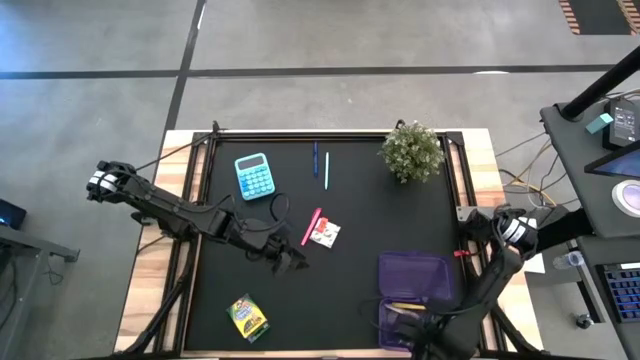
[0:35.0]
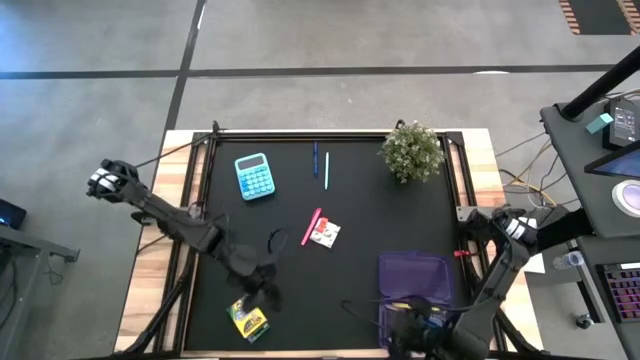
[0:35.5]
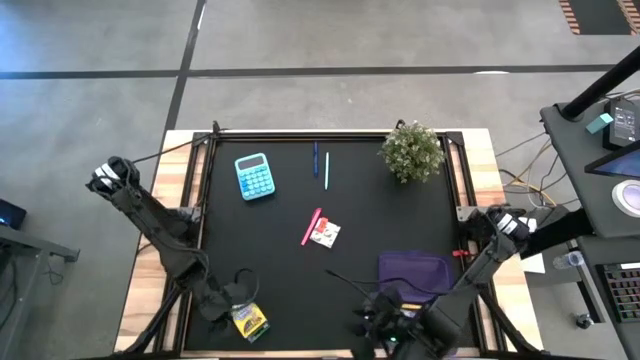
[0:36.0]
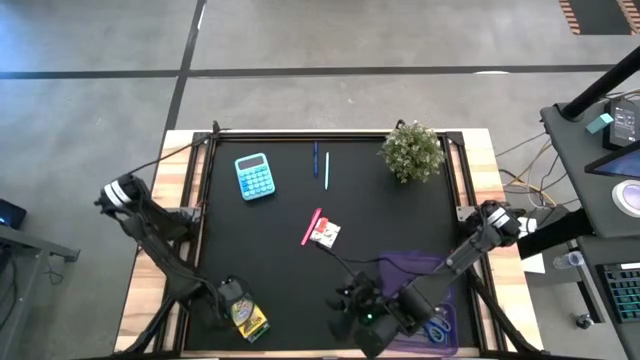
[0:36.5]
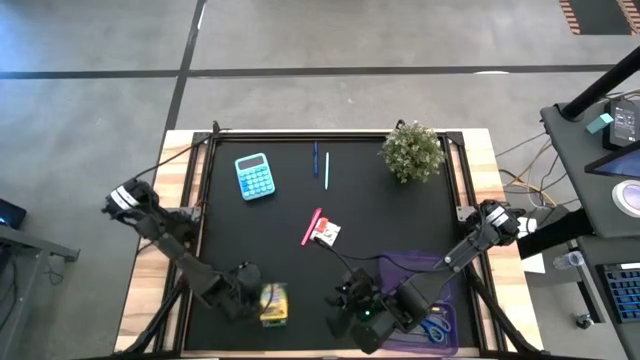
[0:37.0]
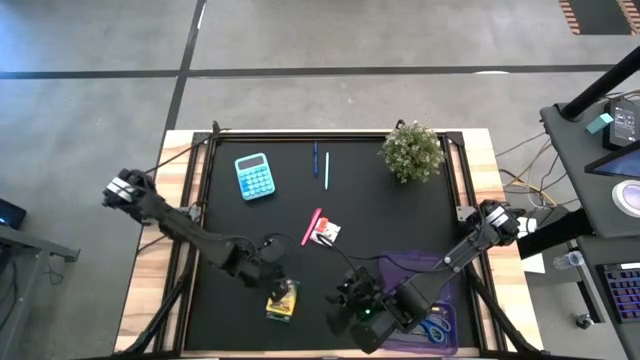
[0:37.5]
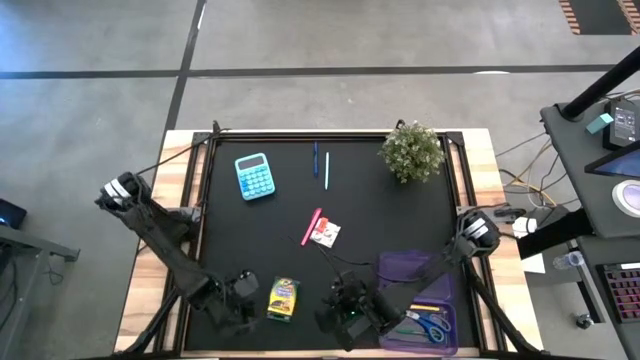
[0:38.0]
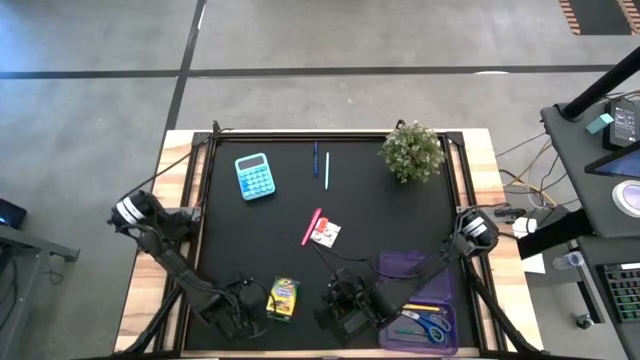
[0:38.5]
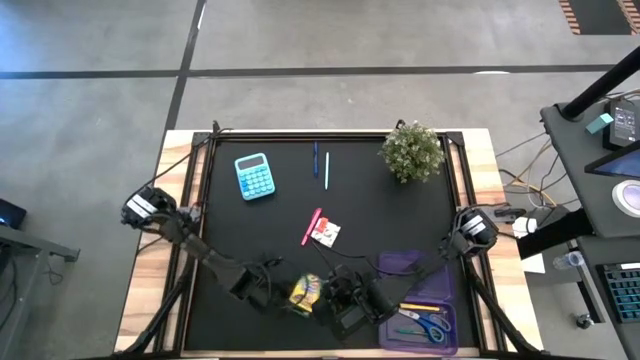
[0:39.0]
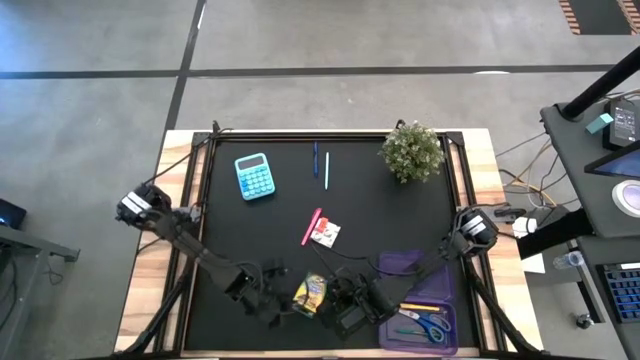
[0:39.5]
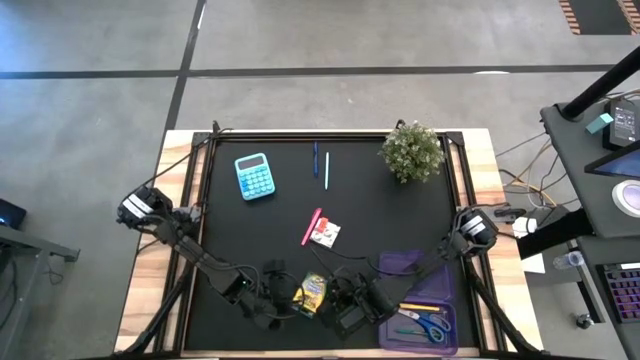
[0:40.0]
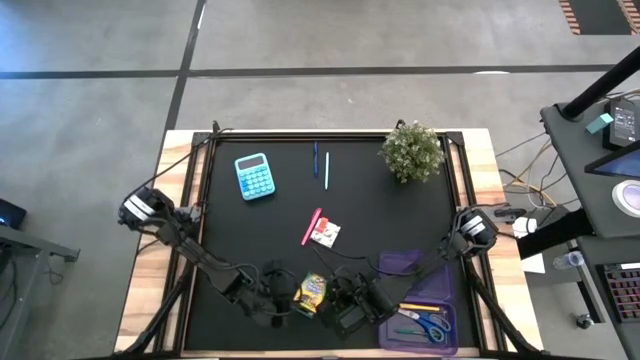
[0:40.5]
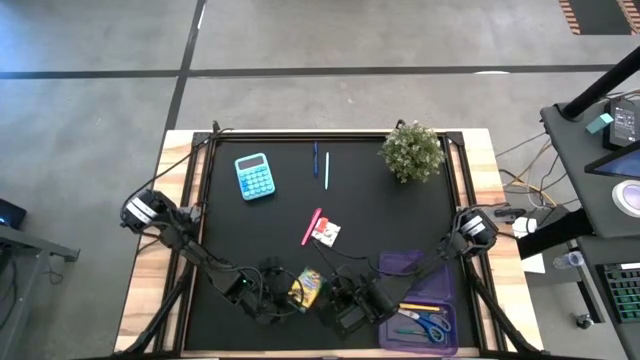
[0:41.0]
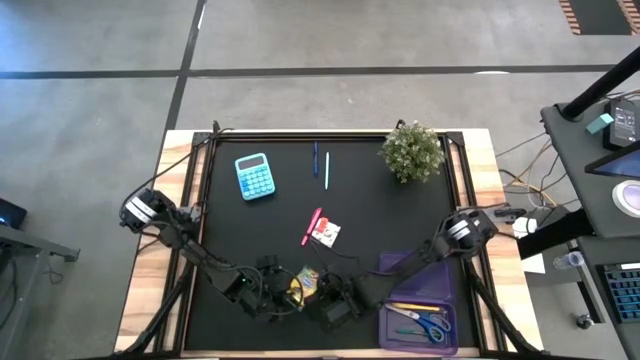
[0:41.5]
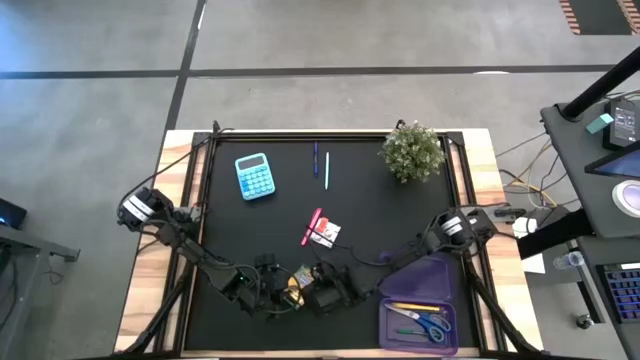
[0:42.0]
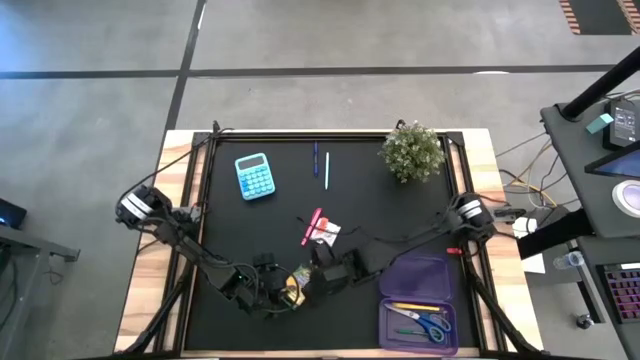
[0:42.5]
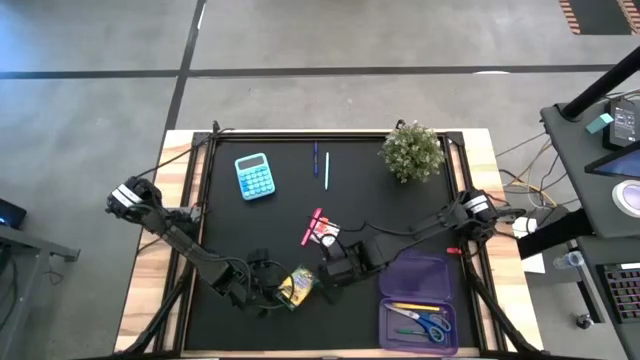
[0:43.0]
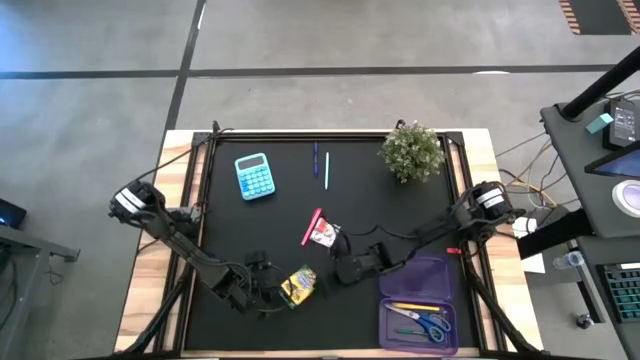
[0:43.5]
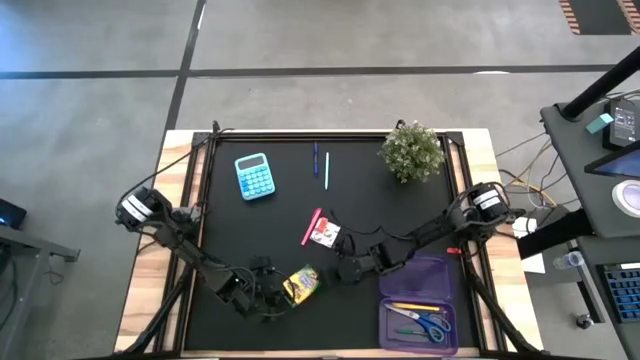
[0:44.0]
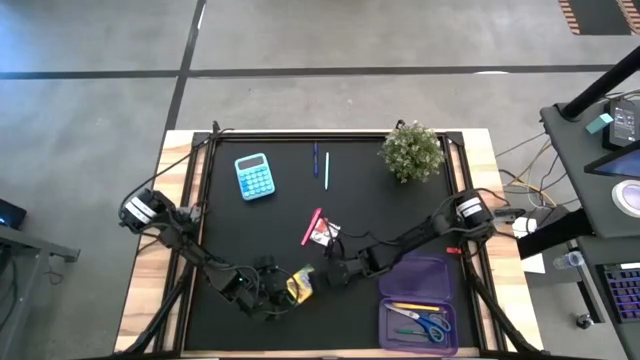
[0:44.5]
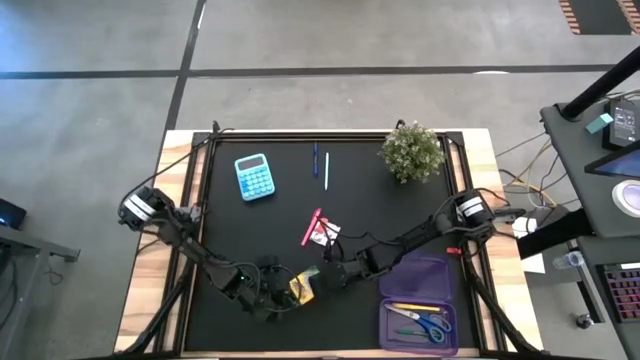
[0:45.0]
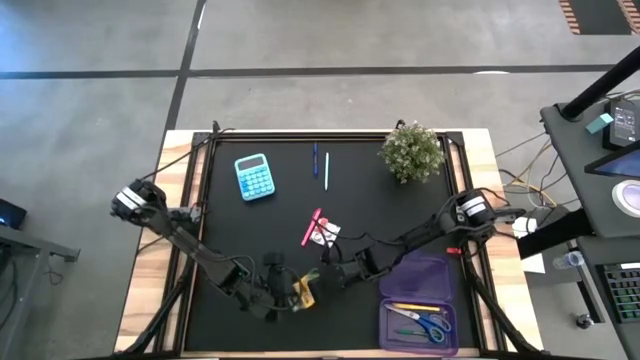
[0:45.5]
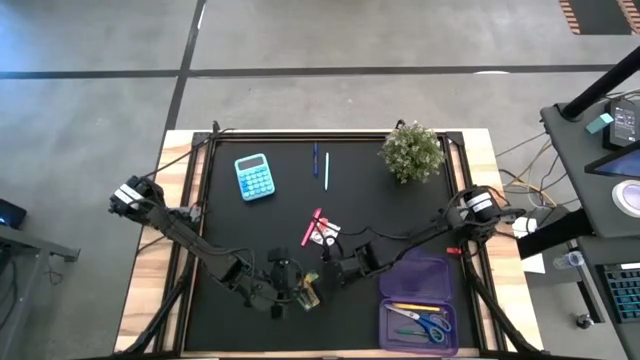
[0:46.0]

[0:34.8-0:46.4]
Task: Pack school essentials
Put the crayon box into the purple supply box

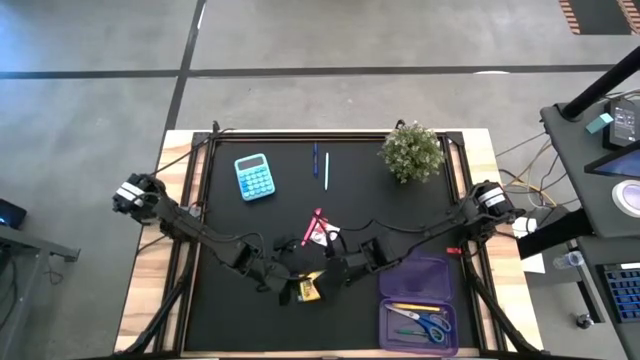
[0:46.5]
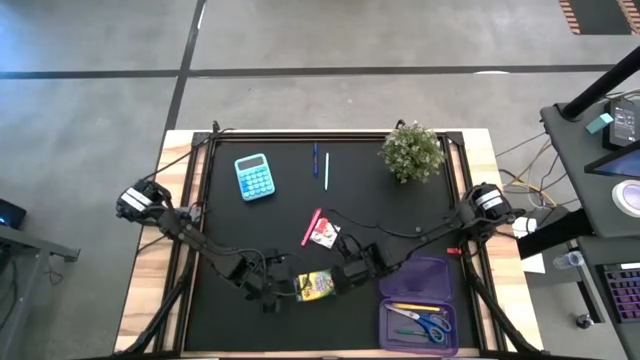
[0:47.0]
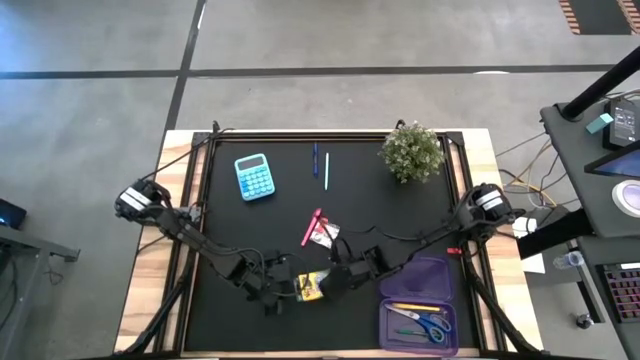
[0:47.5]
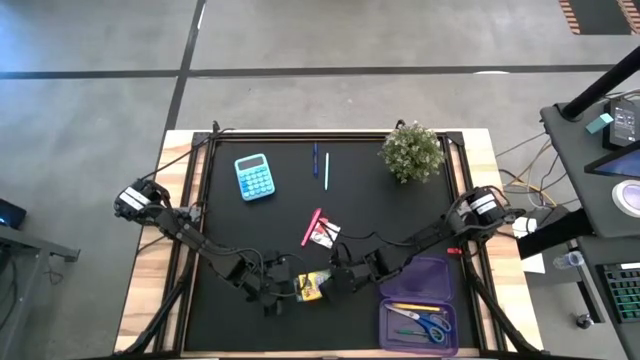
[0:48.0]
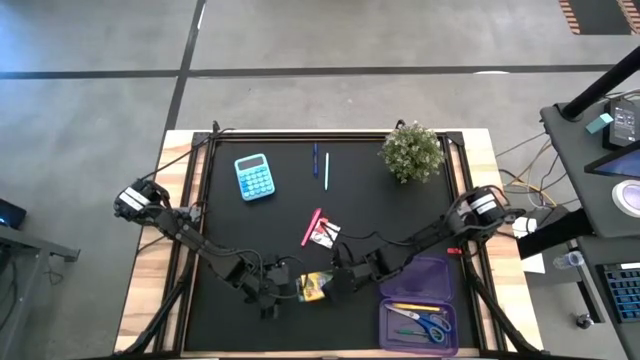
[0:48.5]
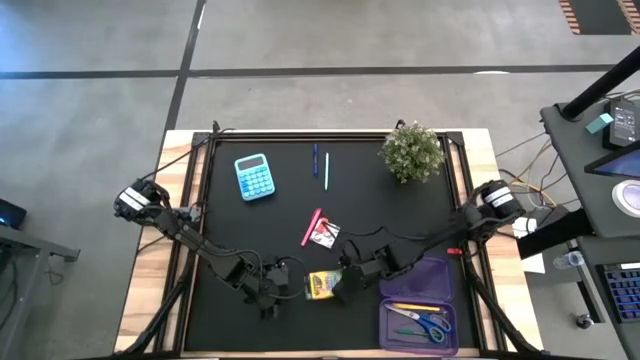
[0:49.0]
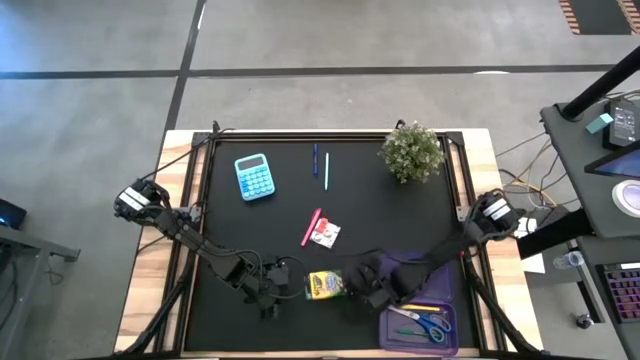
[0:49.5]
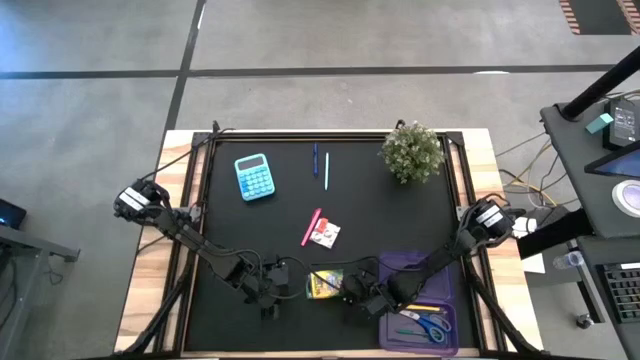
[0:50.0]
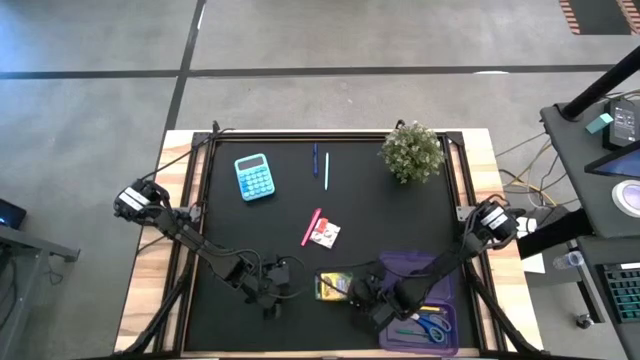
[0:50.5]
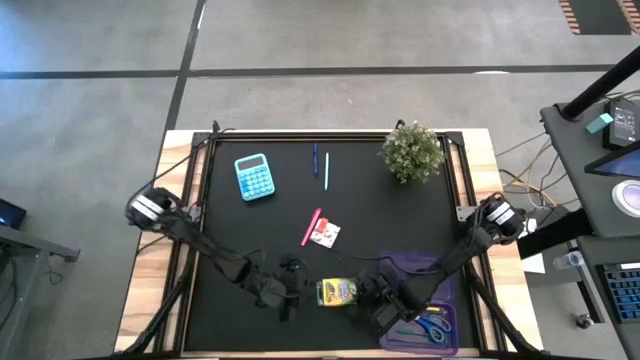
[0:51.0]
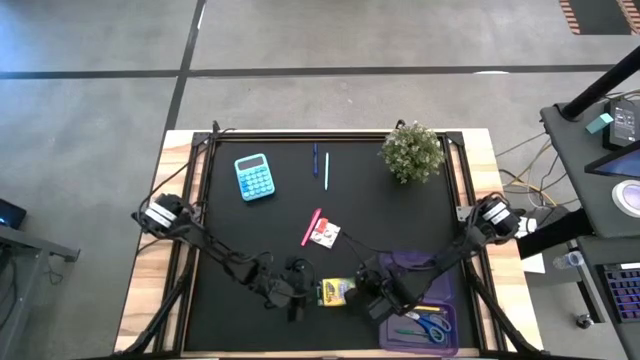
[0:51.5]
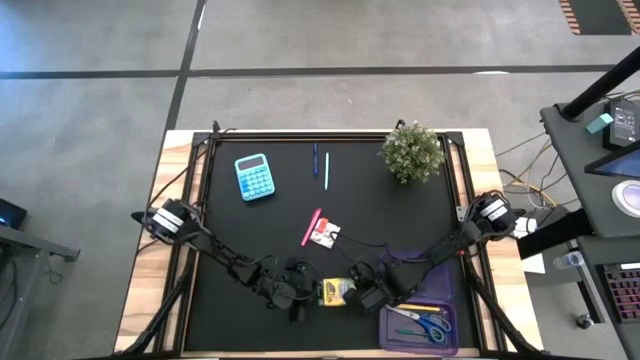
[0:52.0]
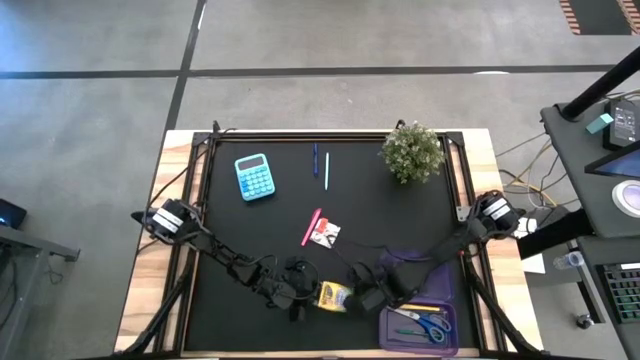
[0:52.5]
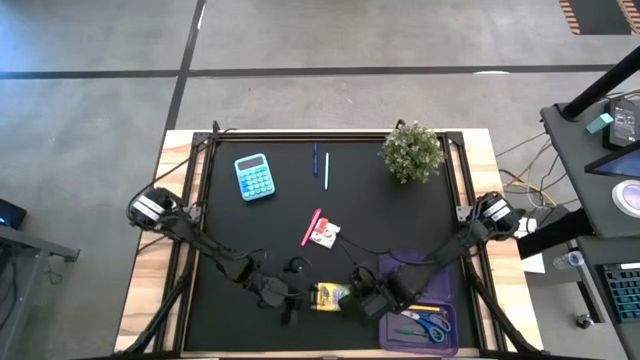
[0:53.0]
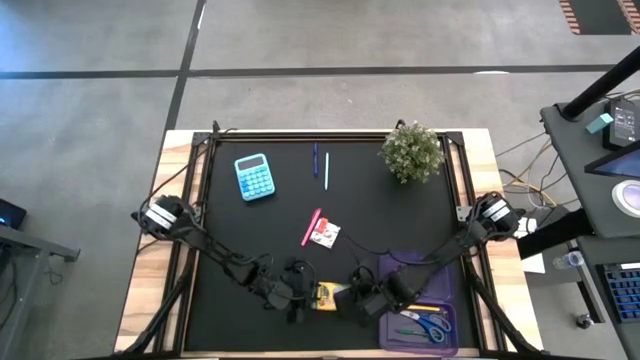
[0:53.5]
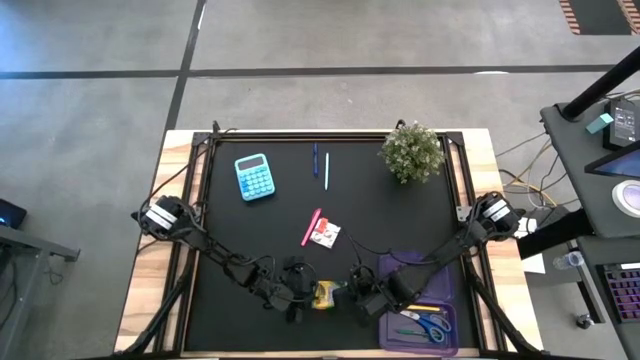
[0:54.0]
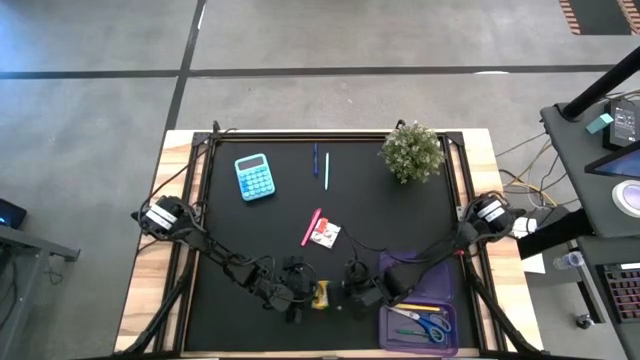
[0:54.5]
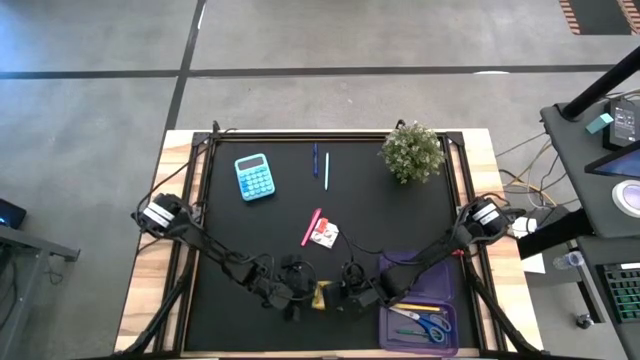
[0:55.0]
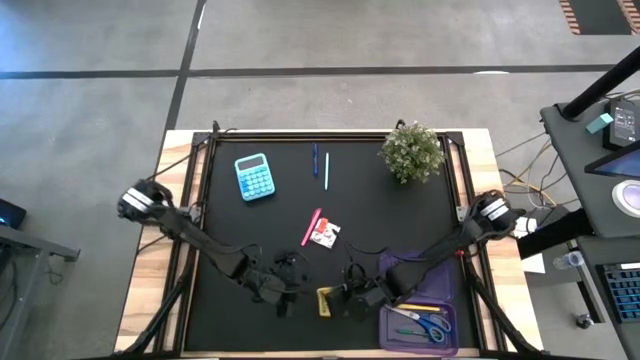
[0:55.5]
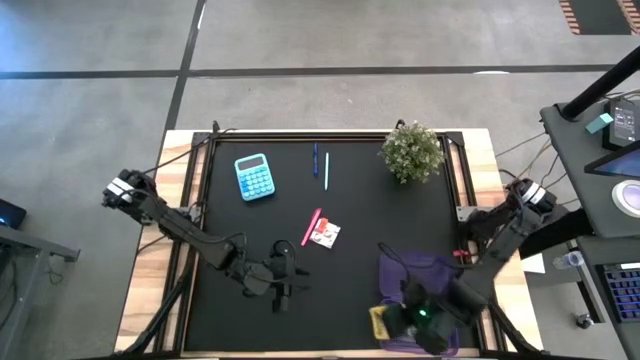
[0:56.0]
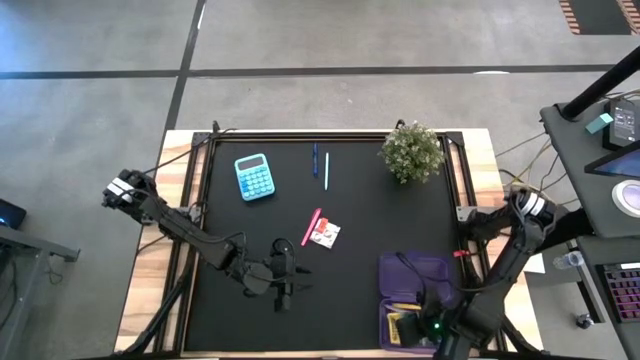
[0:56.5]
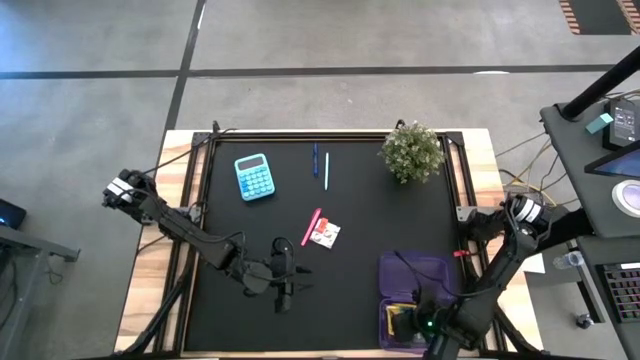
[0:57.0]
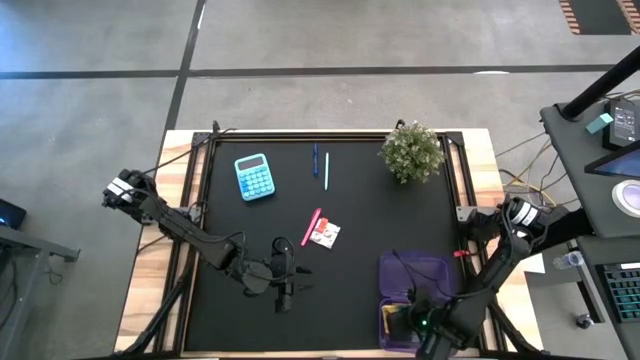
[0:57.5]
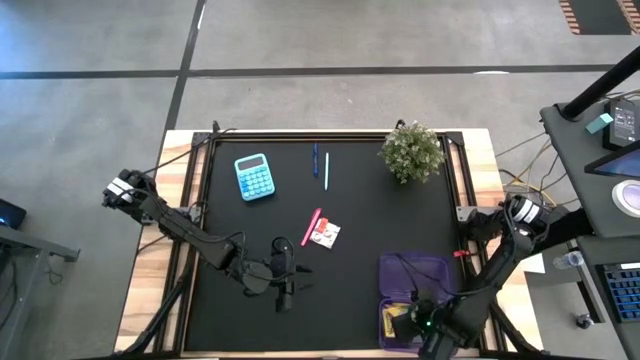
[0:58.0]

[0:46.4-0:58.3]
Put the crayon box into the purple supply box
